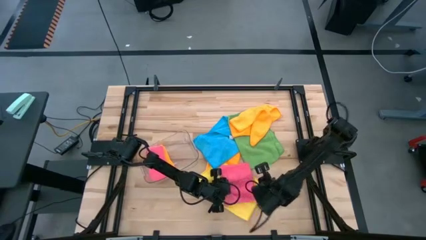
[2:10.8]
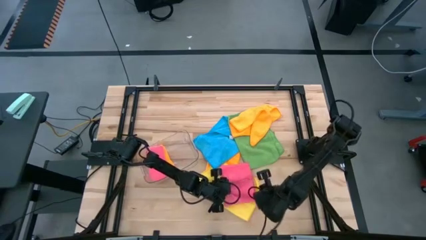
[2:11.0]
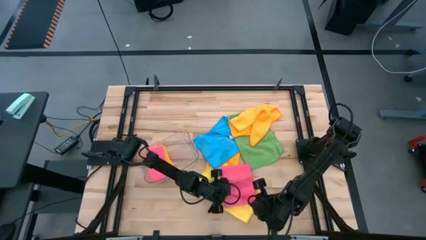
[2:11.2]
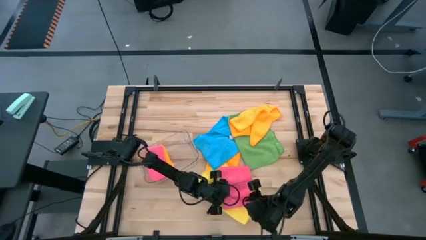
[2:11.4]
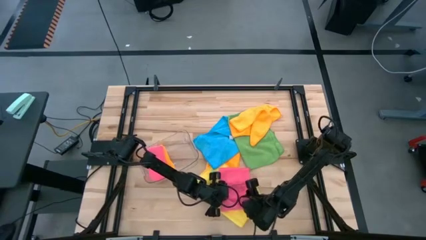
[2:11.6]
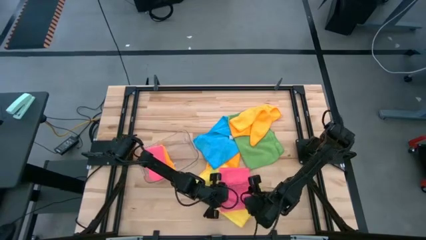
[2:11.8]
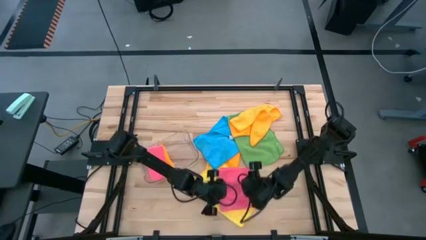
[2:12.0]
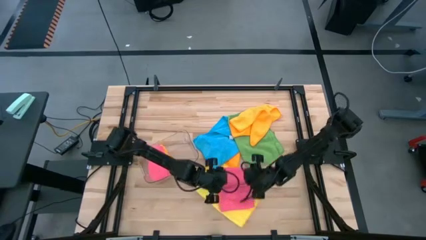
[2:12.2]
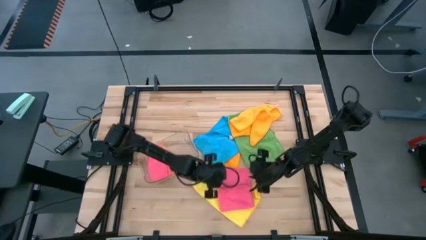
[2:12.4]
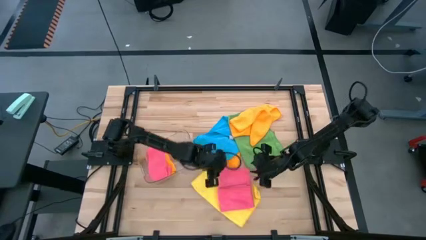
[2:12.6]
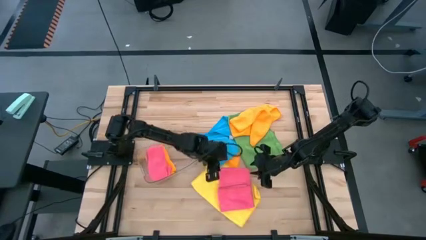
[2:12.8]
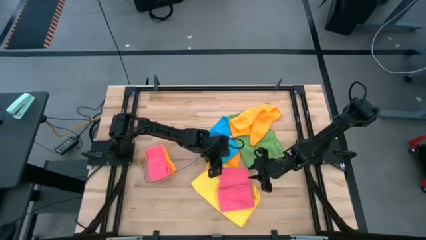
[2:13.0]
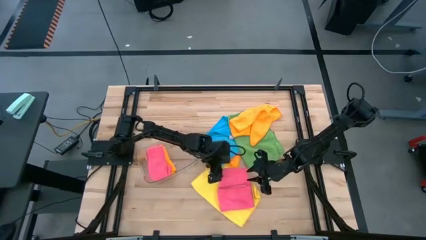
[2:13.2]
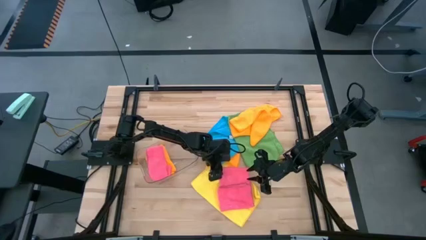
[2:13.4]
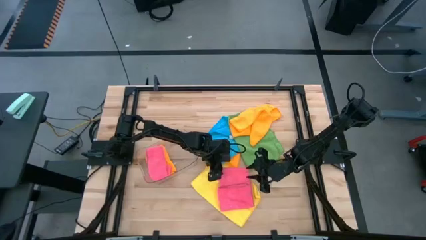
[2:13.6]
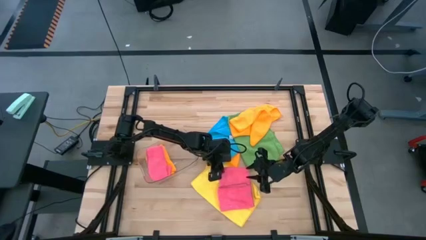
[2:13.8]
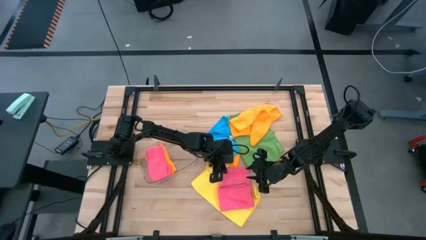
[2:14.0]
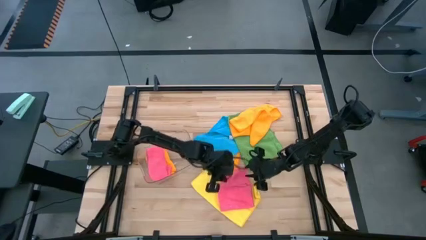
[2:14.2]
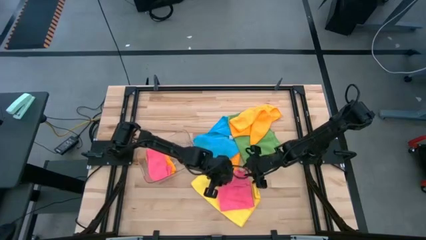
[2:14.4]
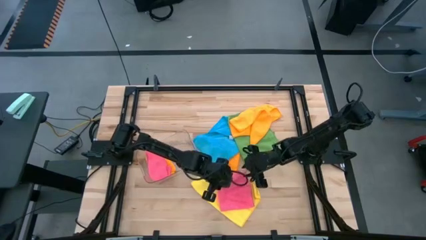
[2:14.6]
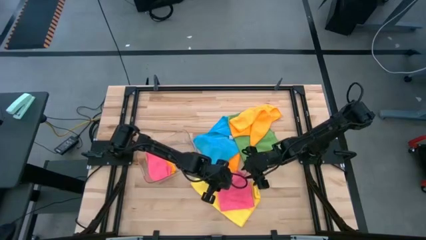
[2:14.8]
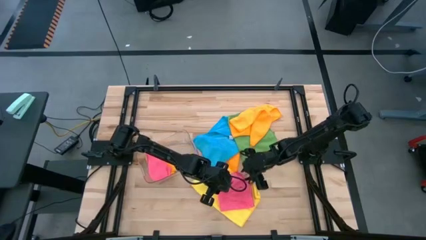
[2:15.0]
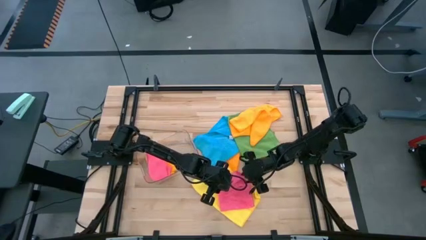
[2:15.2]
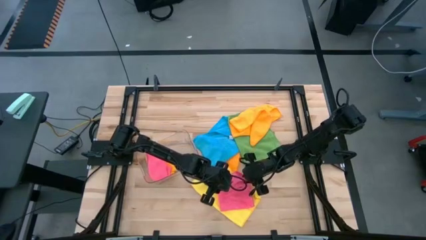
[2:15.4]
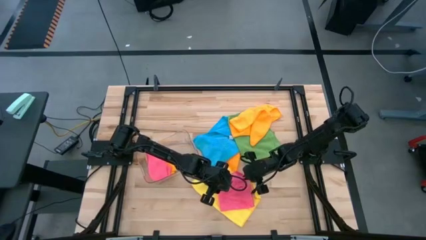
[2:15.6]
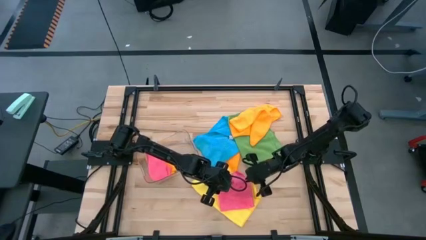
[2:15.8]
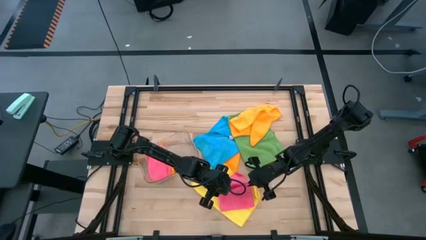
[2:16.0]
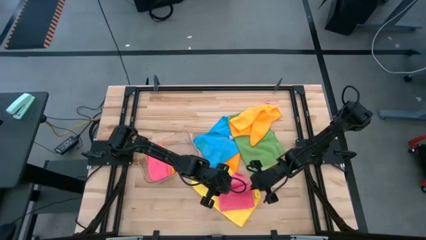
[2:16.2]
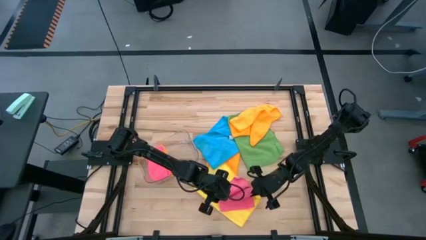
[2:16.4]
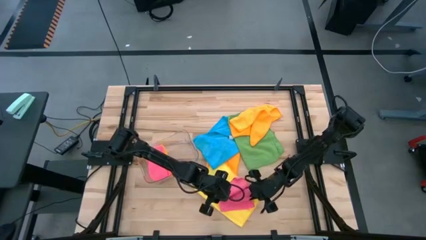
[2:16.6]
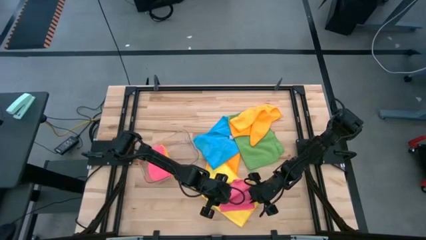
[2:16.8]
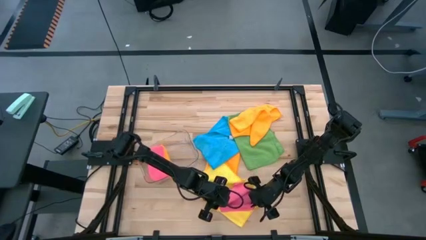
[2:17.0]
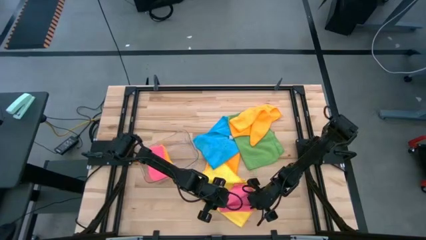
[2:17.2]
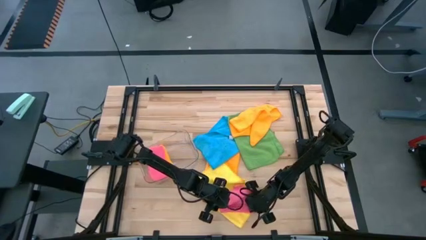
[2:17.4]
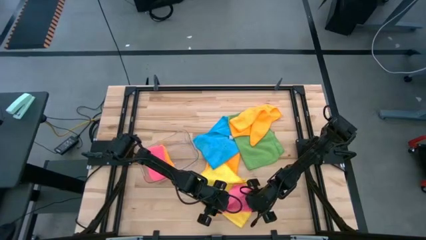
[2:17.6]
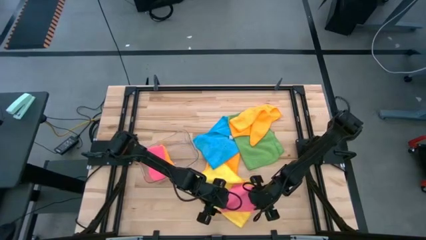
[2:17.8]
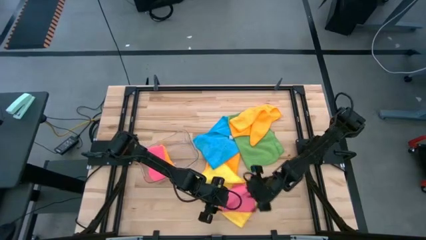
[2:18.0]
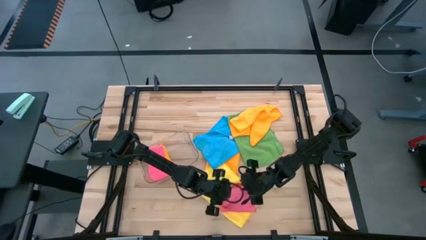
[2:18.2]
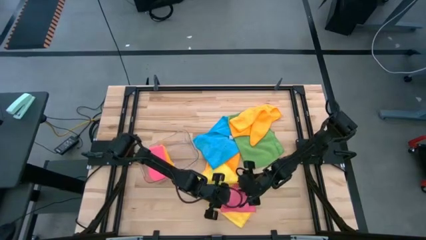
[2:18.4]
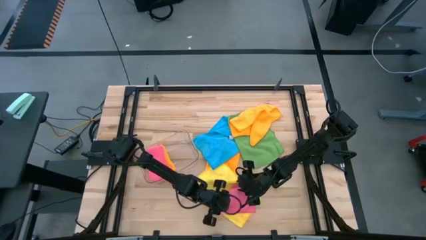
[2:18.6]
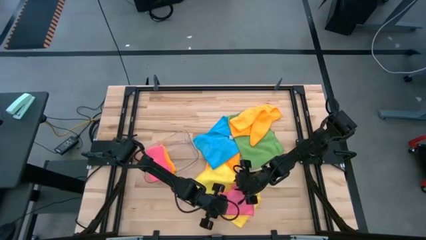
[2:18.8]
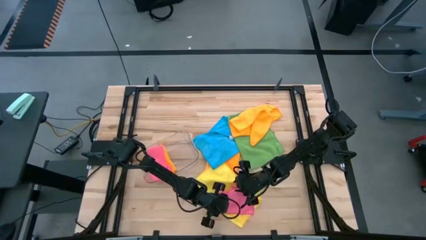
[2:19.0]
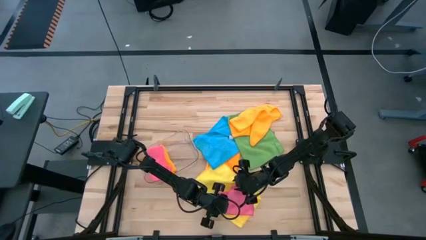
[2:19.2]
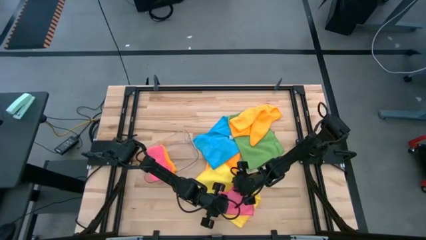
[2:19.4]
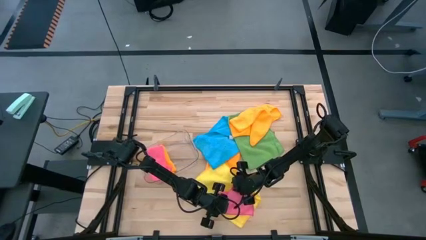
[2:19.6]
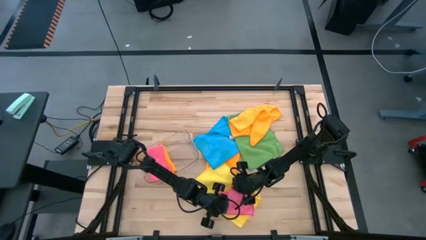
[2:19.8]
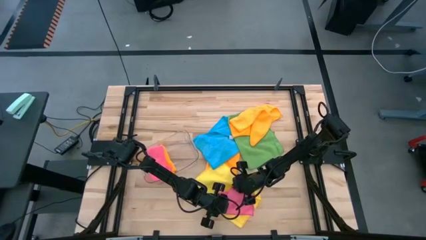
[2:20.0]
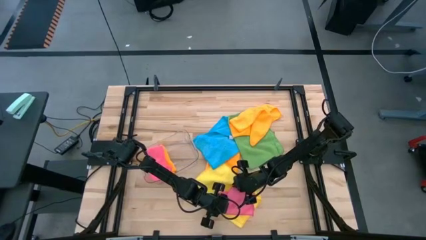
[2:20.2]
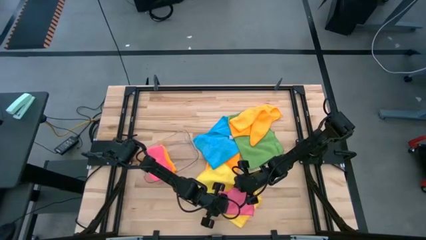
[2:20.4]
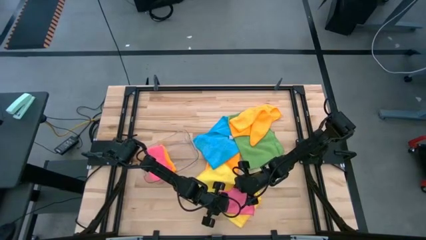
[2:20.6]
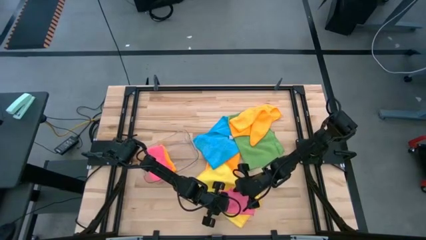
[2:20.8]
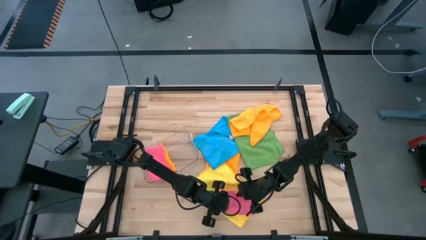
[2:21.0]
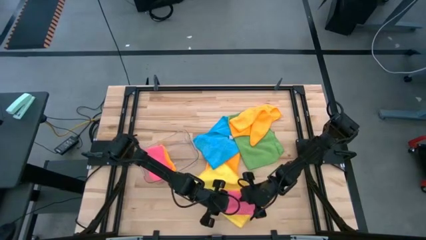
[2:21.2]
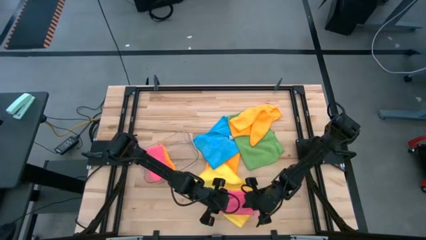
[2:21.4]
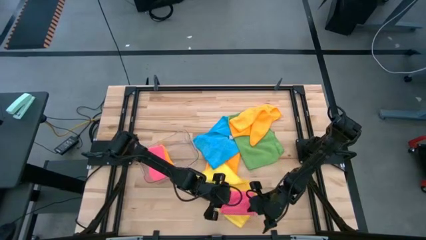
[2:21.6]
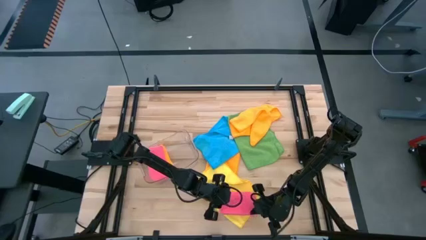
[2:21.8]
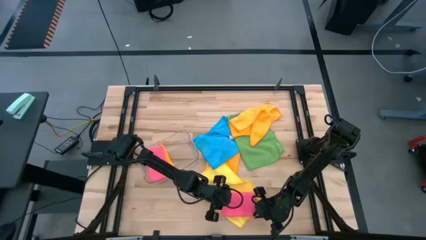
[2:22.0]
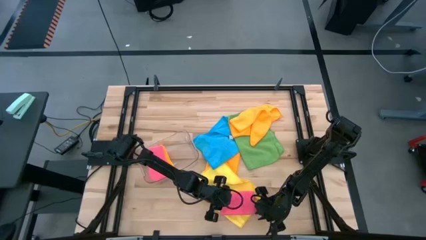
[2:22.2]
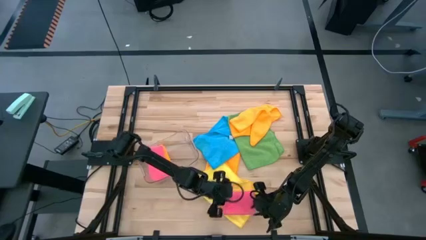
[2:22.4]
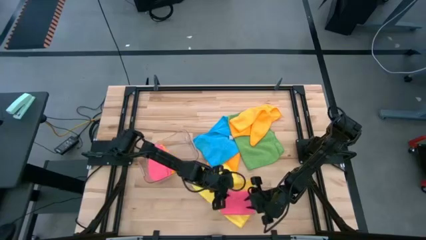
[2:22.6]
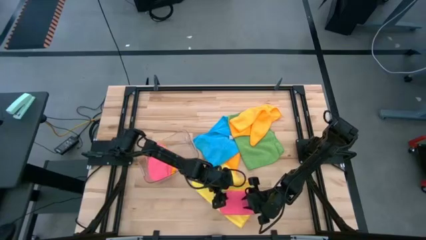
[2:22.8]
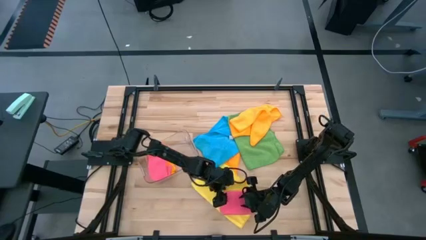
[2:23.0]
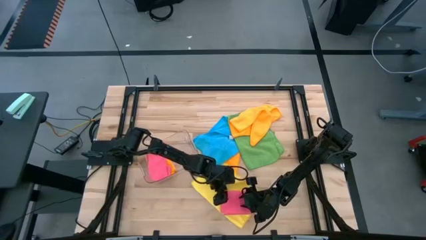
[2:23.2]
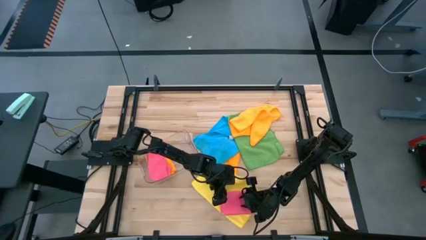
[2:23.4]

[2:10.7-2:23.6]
Task: Fold microfiber towels
Fold the pink microfiber cloth

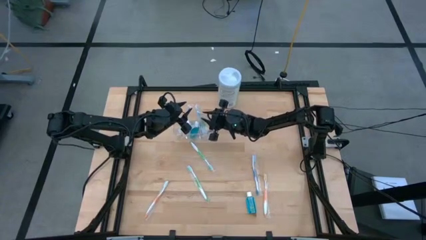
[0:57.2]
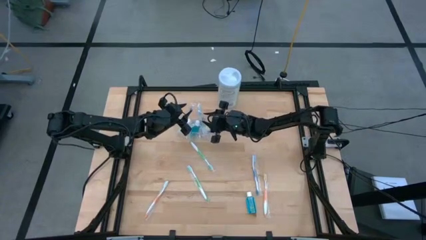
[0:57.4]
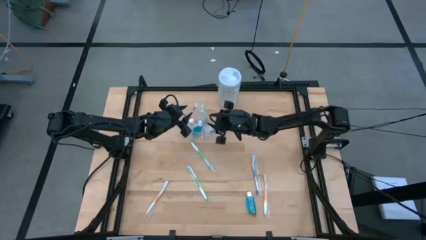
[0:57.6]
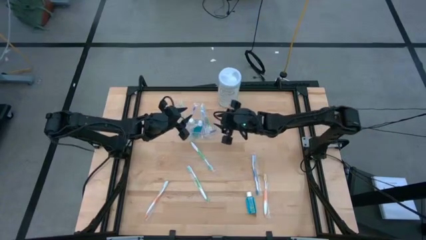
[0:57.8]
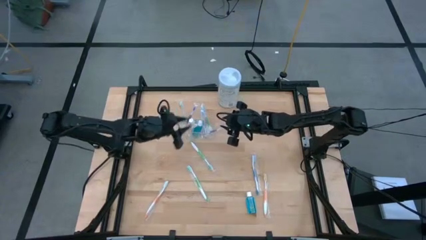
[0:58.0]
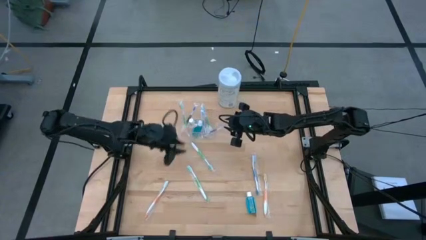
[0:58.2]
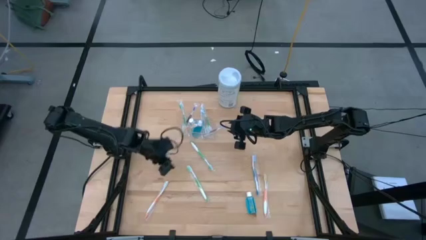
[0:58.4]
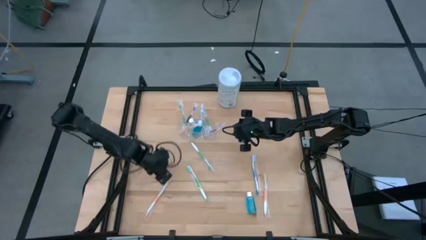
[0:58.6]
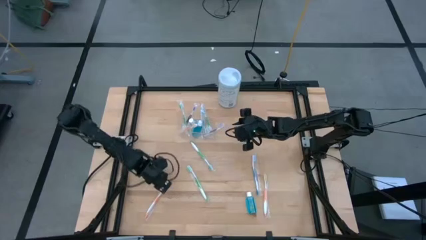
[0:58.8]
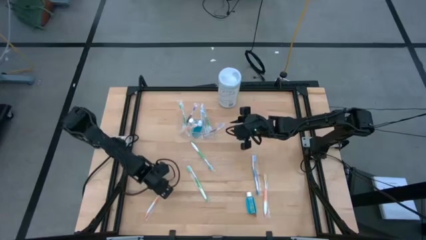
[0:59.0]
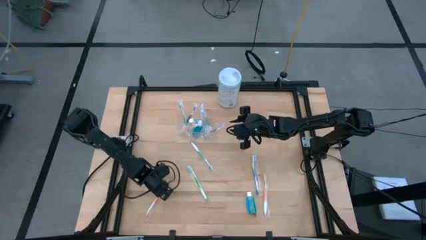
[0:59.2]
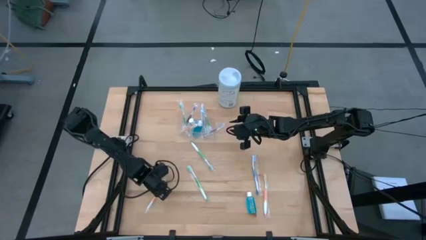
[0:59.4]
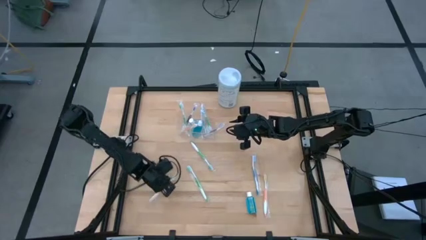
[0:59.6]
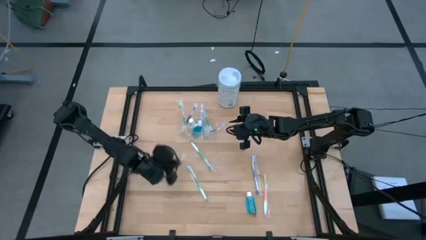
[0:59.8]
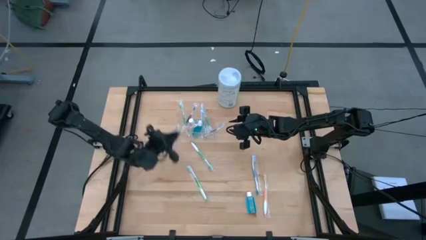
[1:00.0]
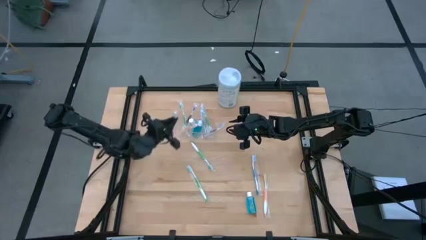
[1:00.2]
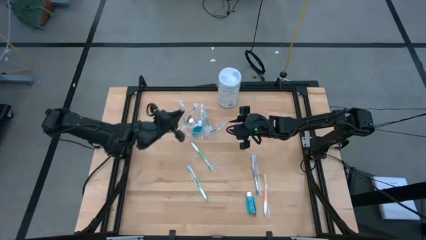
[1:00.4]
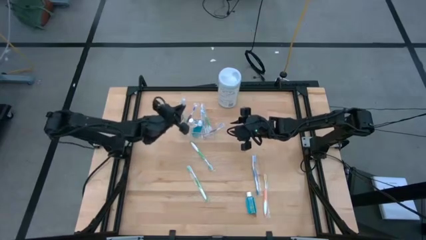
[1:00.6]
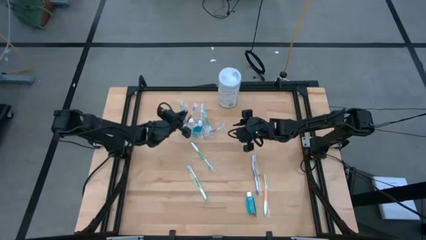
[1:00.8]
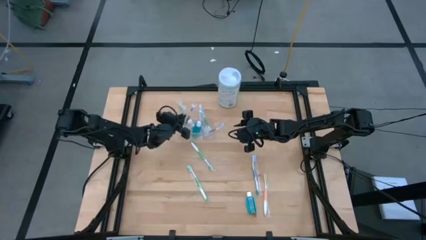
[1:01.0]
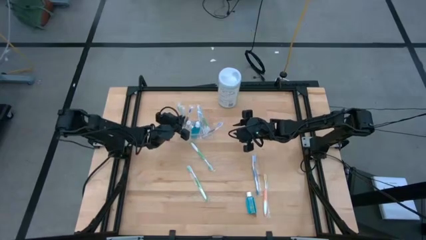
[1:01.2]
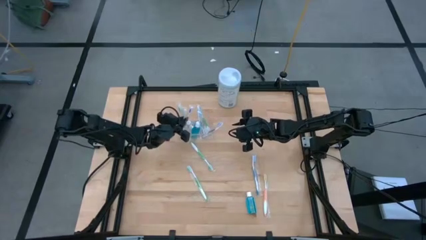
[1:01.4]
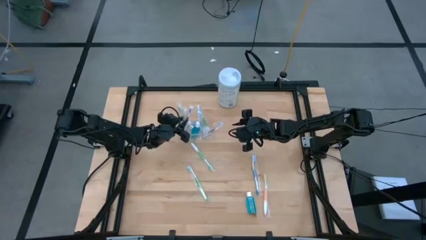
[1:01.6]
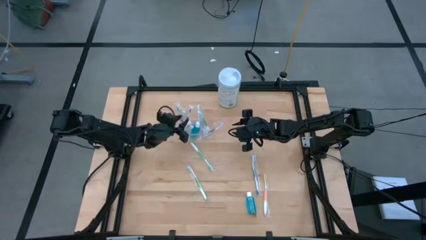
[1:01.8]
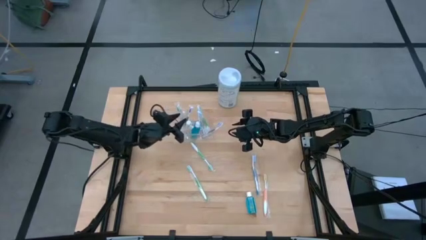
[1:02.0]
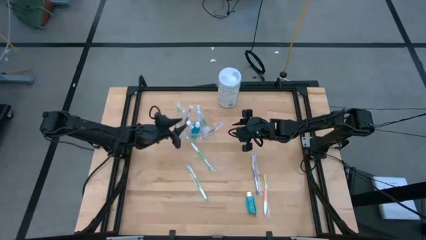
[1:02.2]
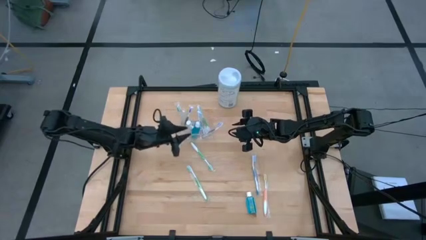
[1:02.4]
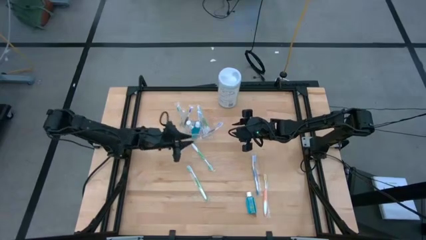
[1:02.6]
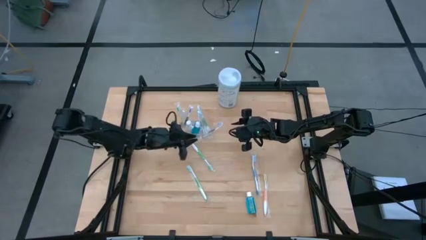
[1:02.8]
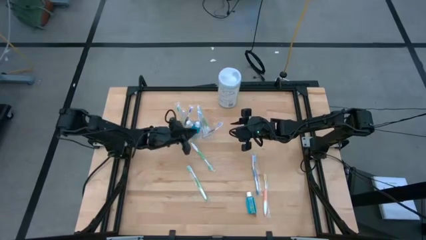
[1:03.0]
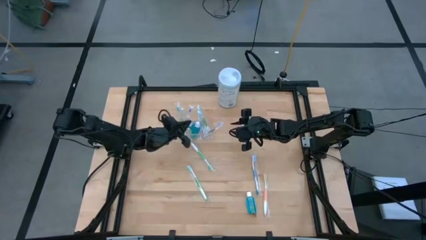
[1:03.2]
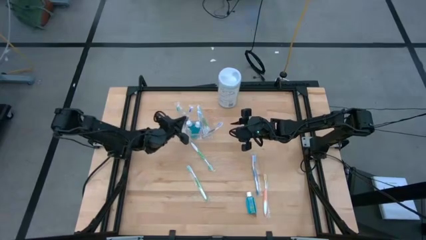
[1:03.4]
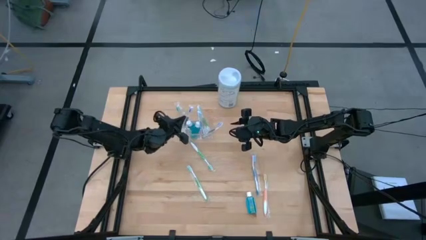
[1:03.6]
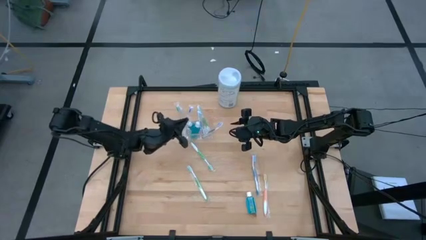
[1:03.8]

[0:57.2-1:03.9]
Task: Pick & Place toothbrushing station
Put the orange toothbrush into the transparent organizer
